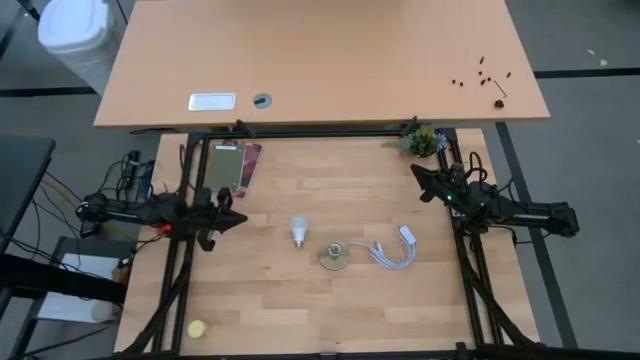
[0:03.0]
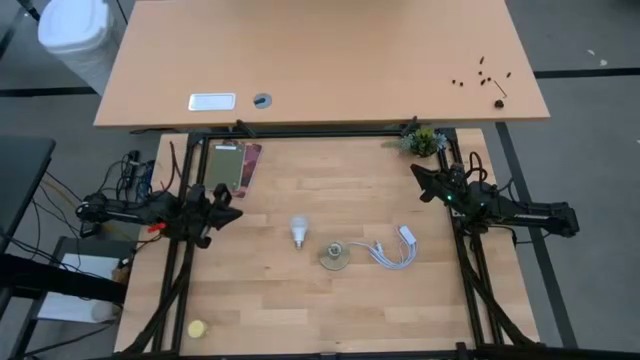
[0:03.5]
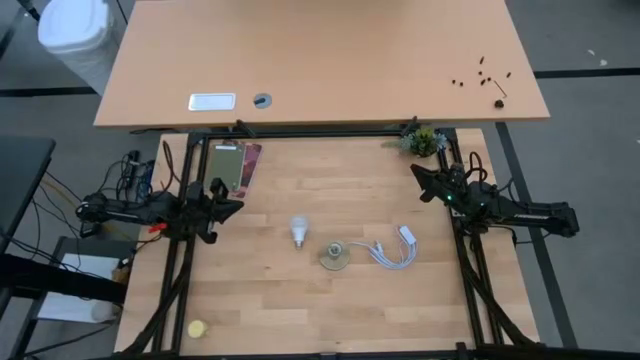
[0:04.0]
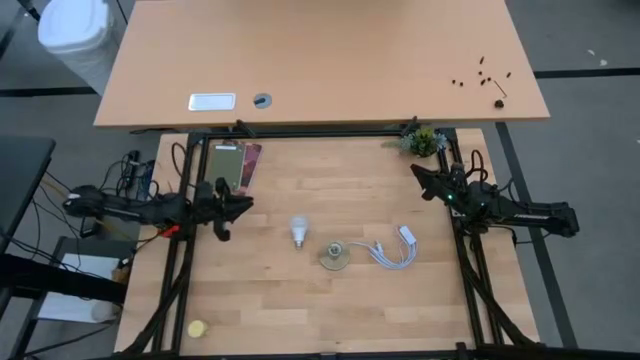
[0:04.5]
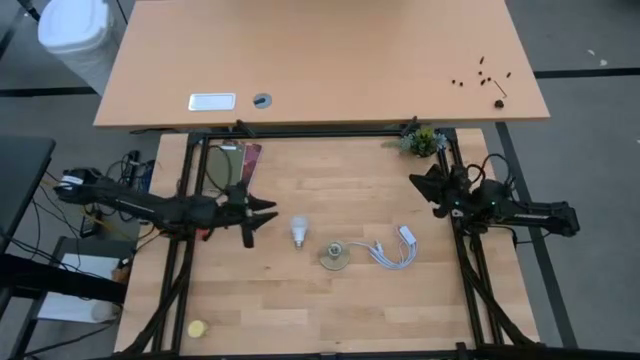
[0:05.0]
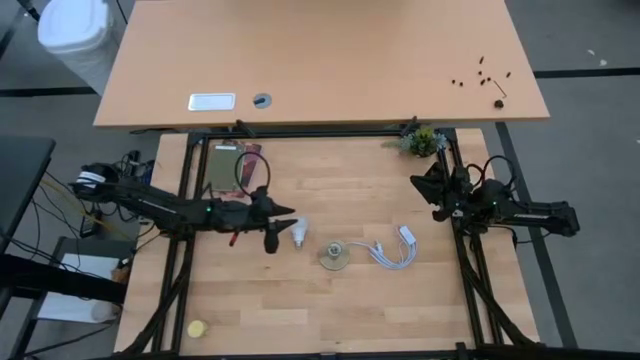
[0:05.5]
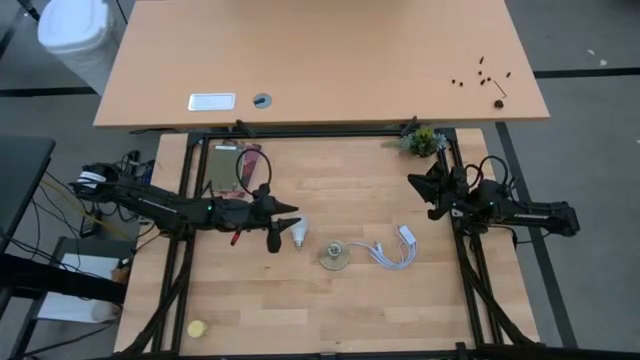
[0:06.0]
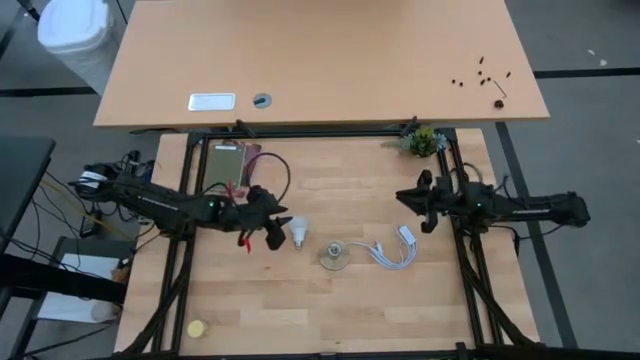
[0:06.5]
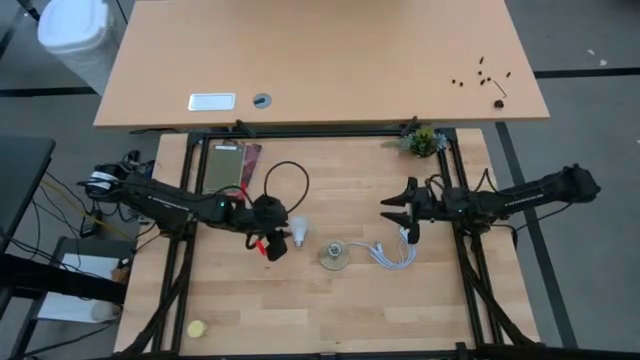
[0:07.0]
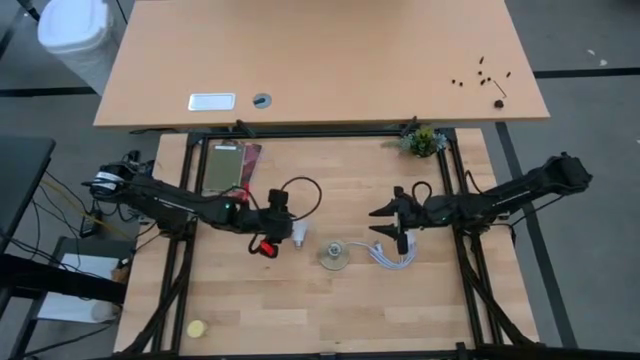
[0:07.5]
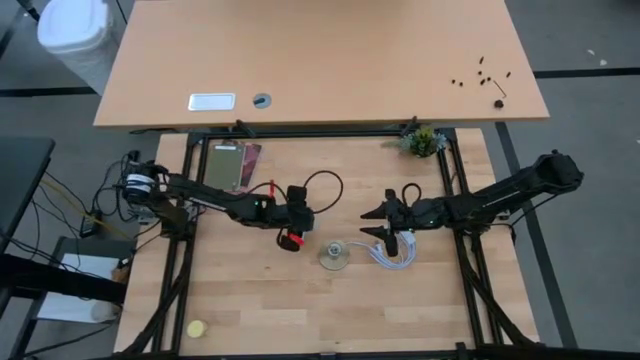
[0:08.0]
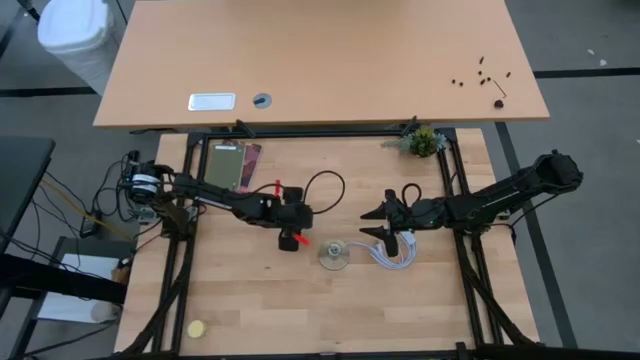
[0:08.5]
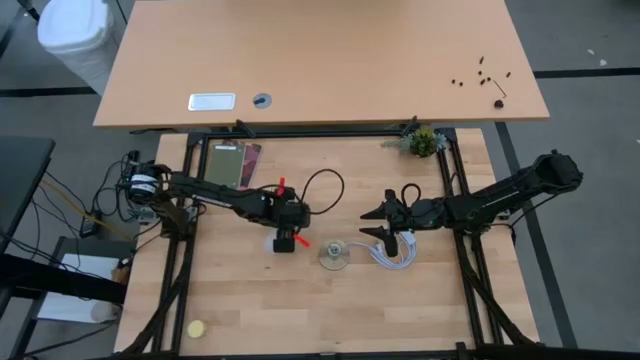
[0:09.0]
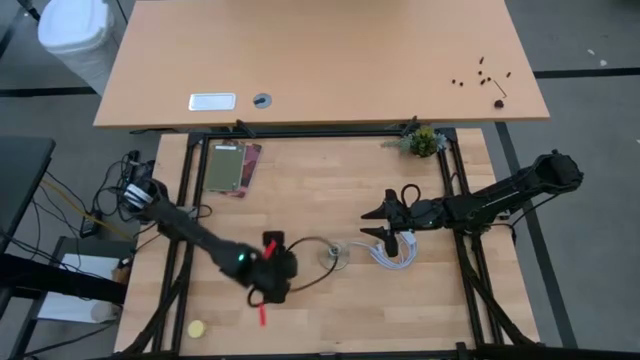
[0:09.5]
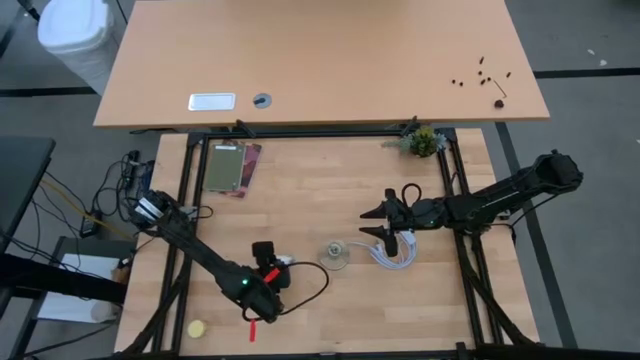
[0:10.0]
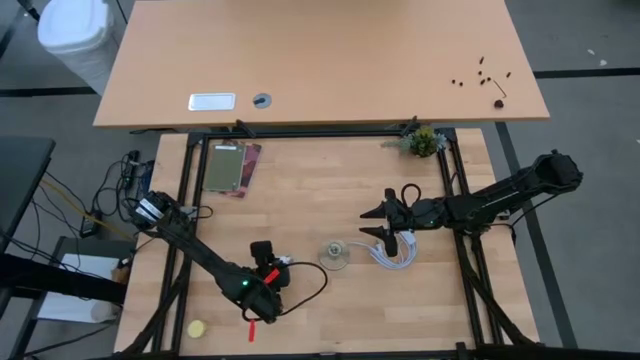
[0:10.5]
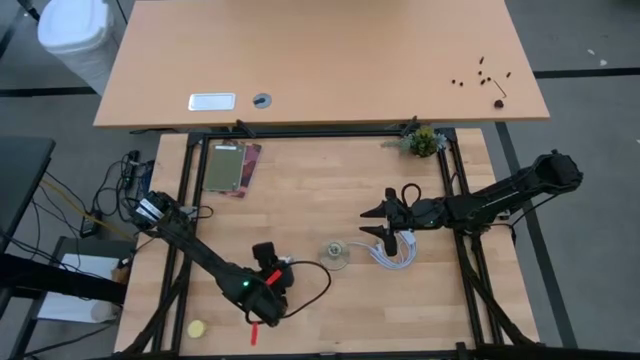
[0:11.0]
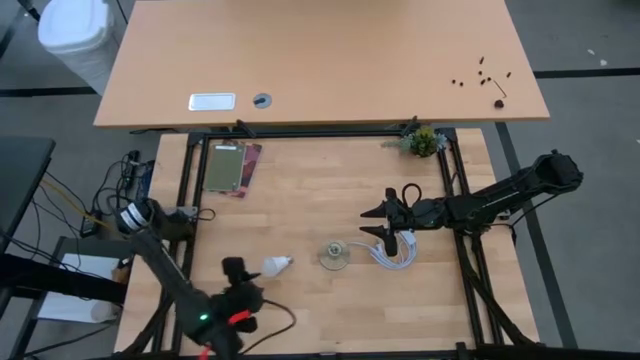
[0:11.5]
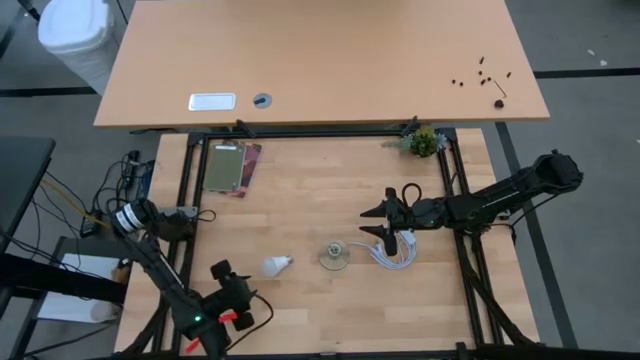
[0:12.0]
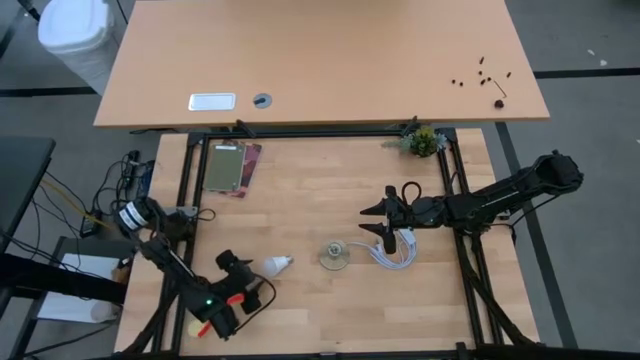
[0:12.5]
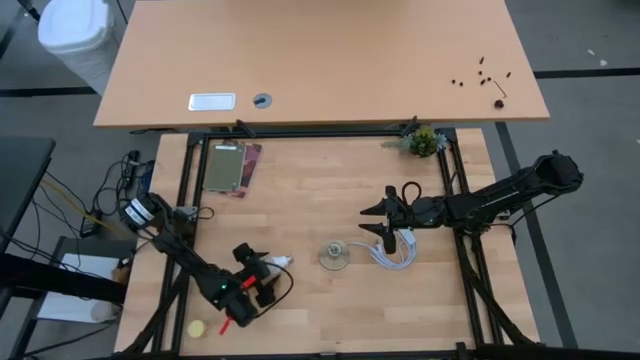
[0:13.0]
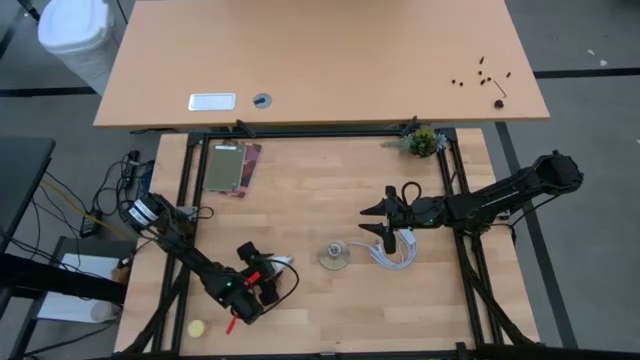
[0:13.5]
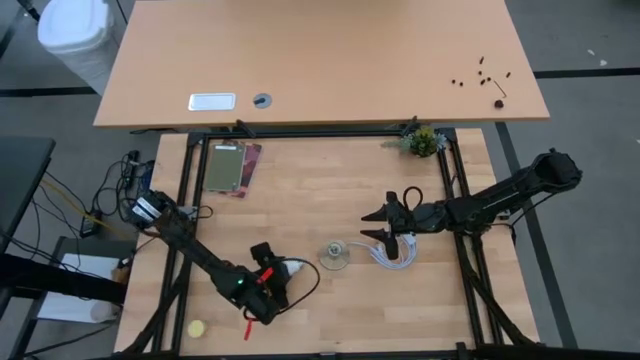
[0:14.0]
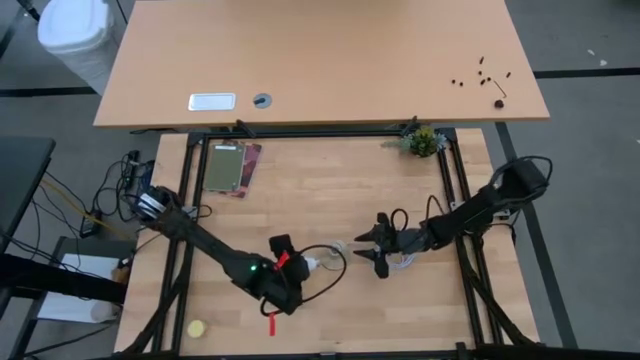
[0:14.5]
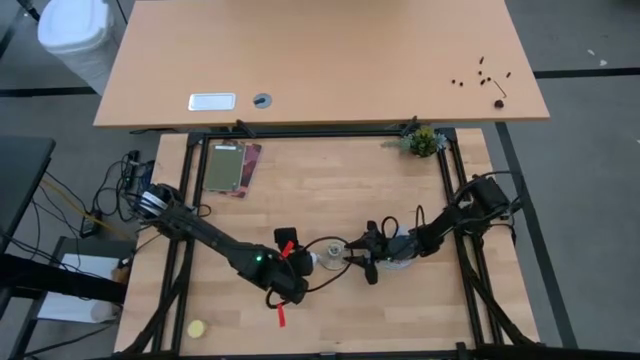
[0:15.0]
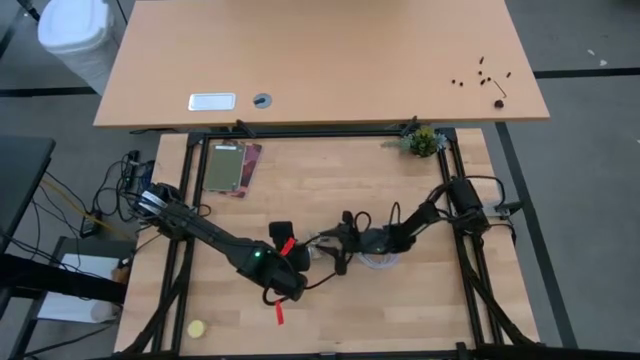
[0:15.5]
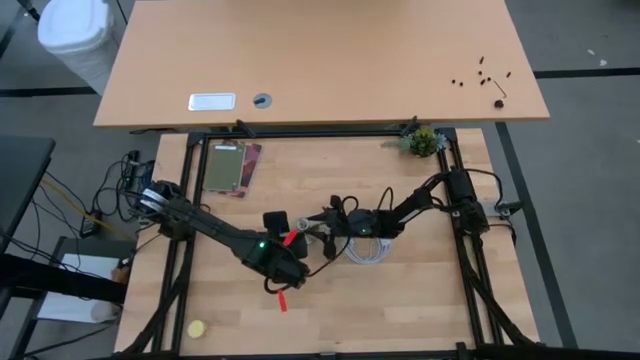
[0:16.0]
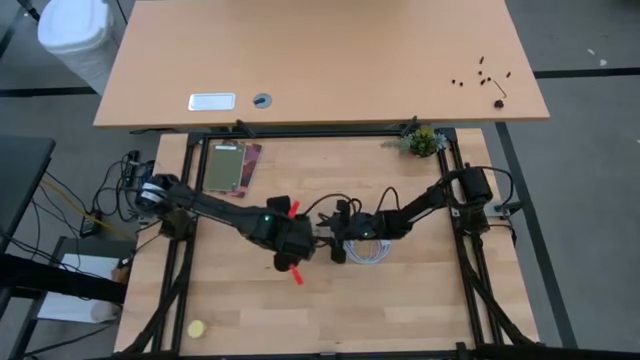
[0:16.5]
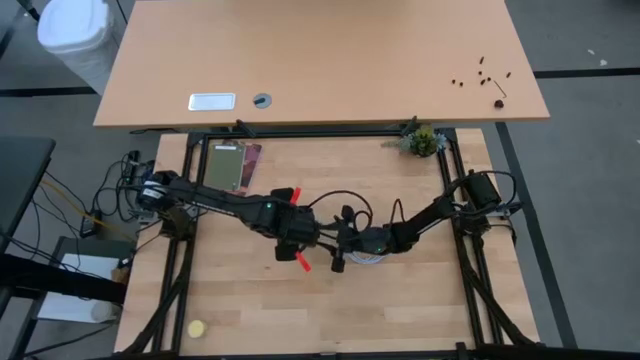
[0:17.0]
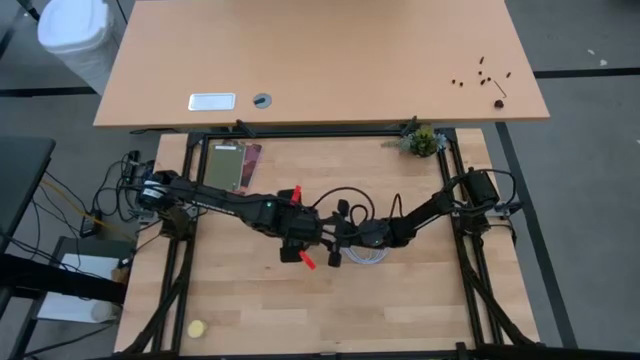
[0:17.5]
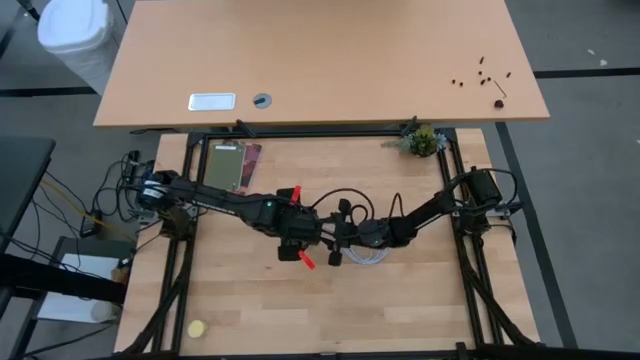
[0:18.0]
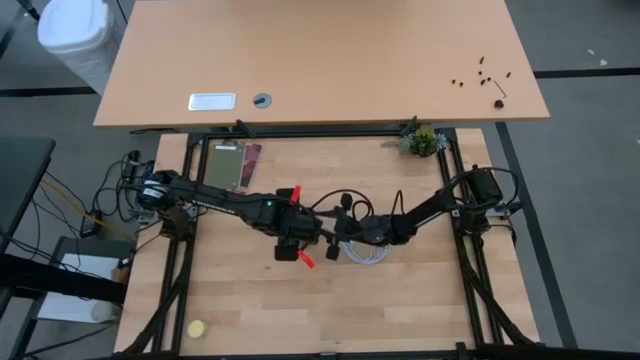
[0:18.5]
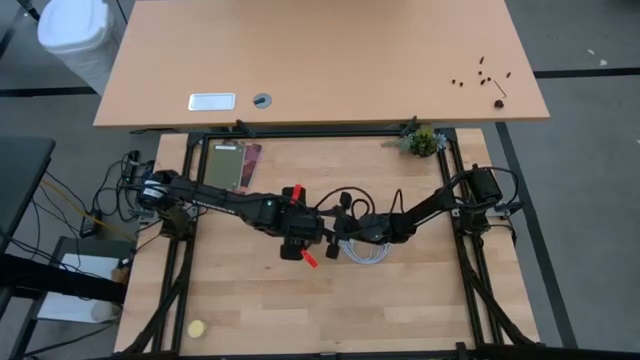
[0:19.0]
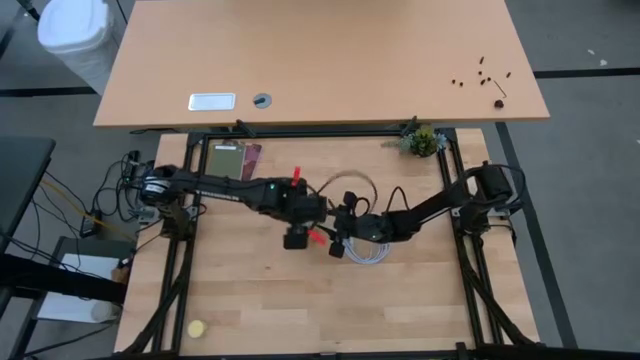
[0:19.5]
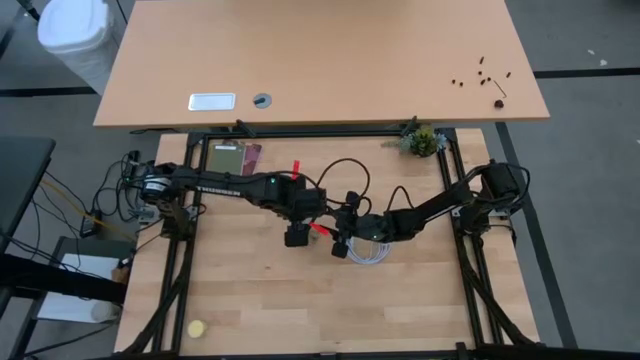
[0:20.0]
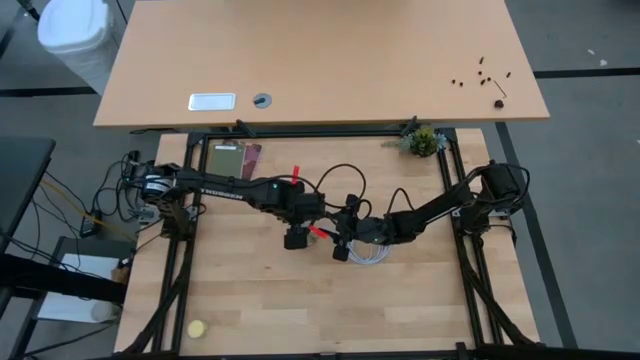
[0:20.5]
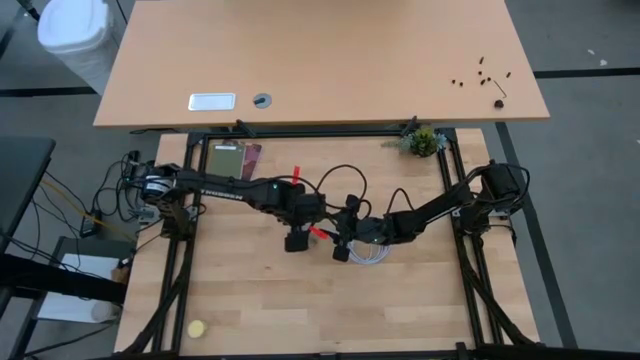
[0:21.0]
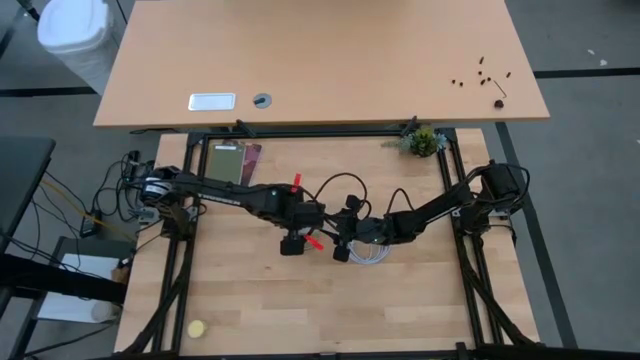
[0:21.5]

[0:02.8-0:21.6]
Task: Screw lightbulb
Insert the white lightbulb into the desk lamp

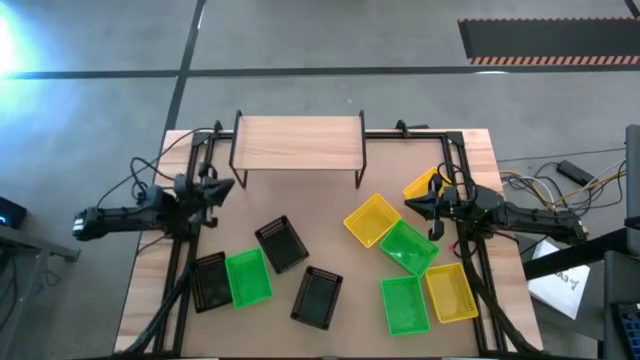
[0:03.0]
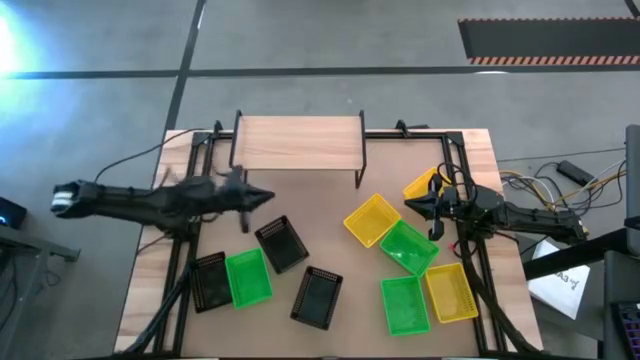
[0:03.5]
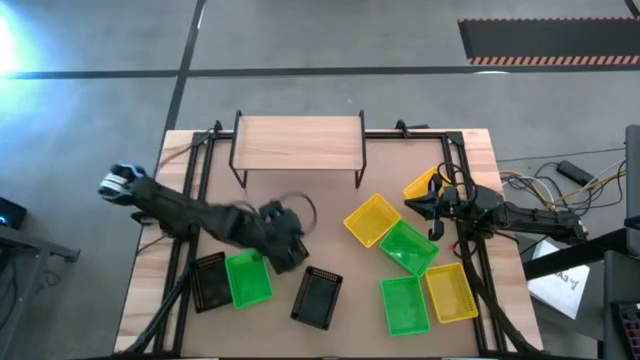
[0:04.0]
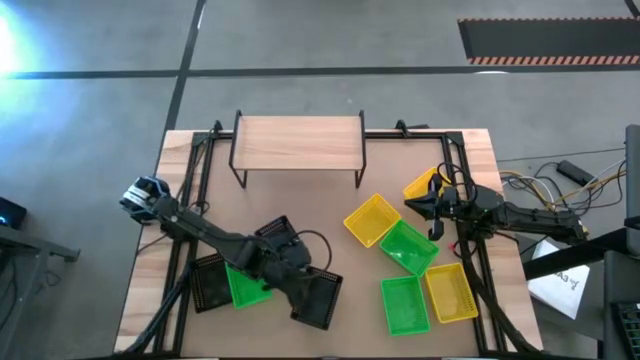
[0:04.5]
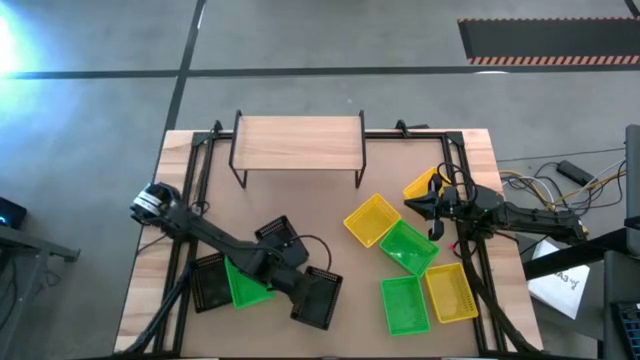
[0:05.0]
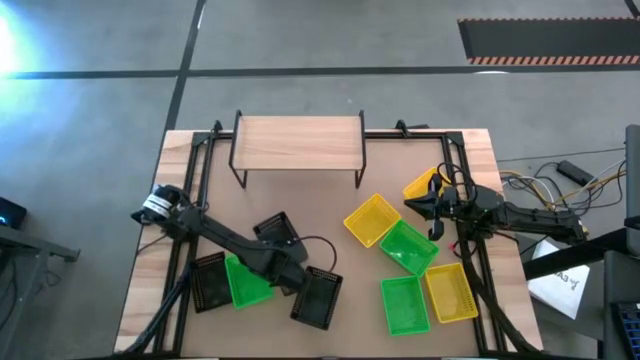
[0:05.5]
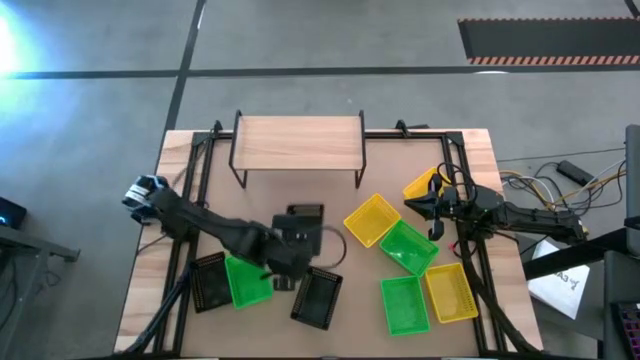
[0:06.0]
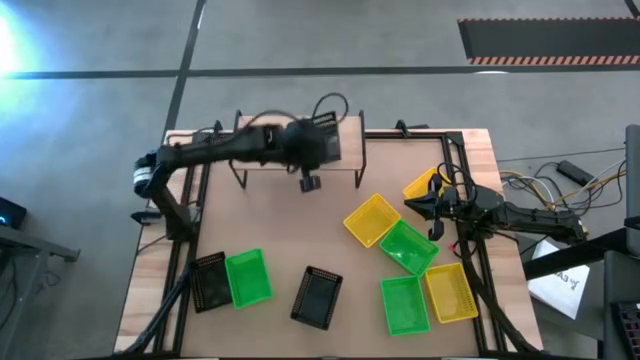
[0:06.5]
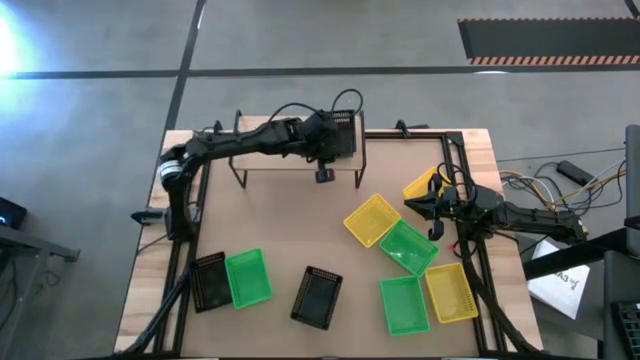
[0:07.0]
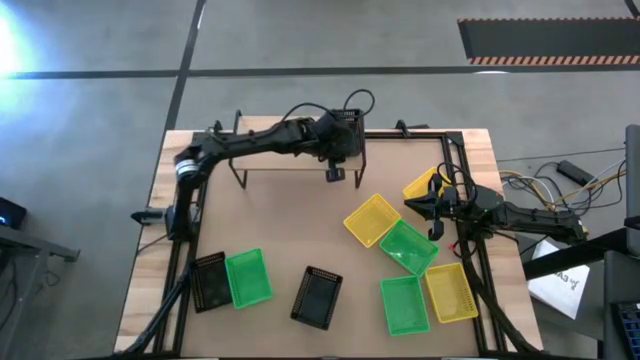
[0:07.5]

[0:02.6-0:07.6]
Task: Stack baskets on shelf by color
Put the top black basket on the shelf
